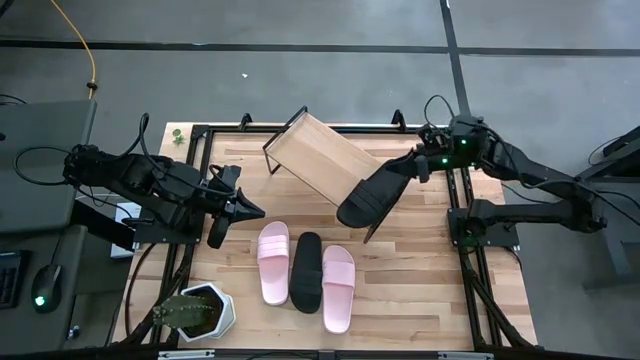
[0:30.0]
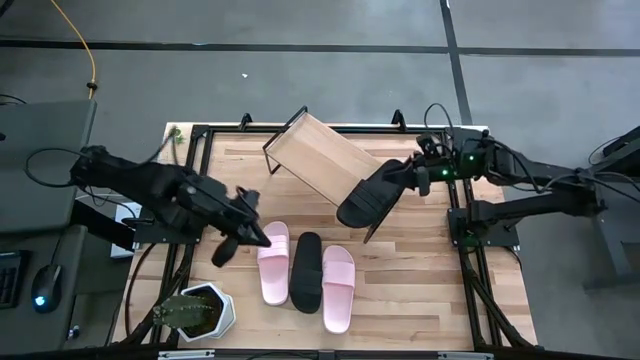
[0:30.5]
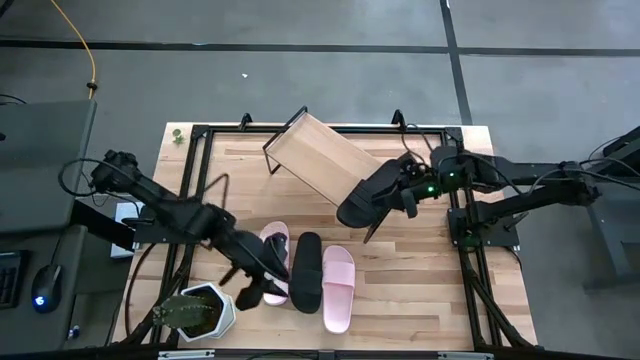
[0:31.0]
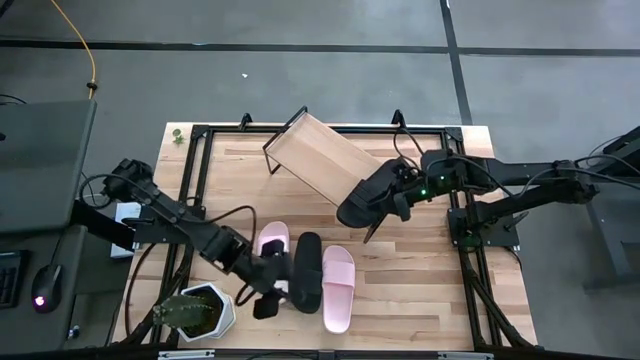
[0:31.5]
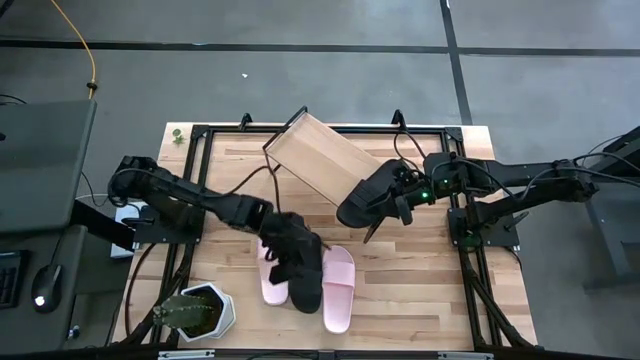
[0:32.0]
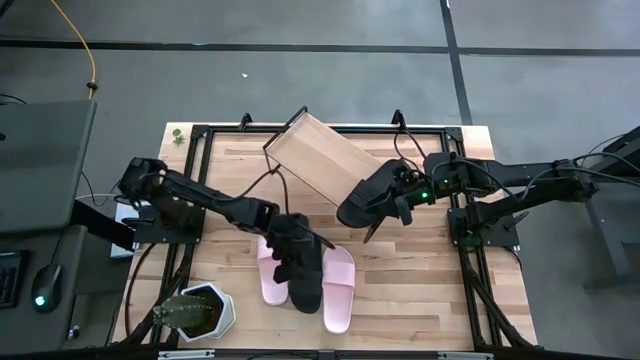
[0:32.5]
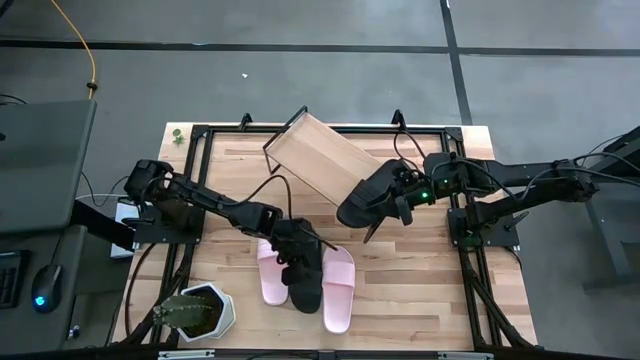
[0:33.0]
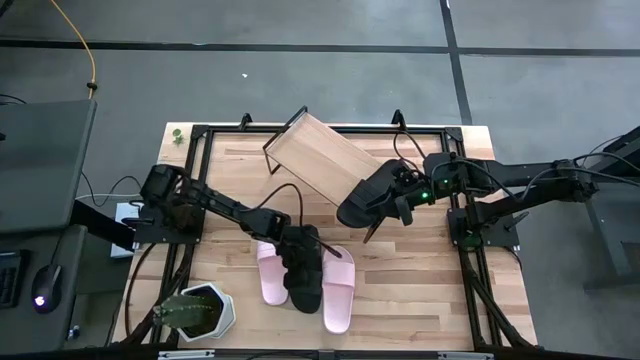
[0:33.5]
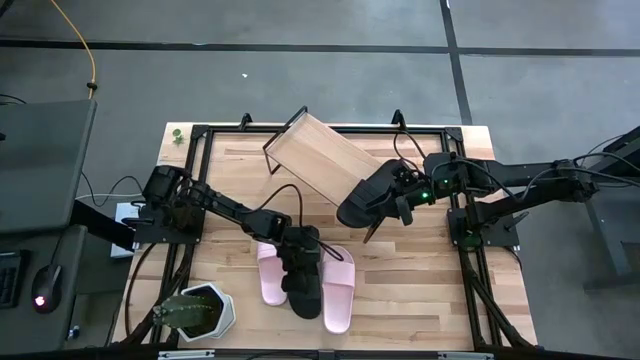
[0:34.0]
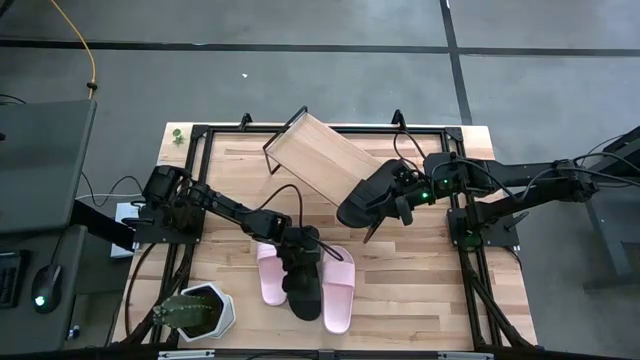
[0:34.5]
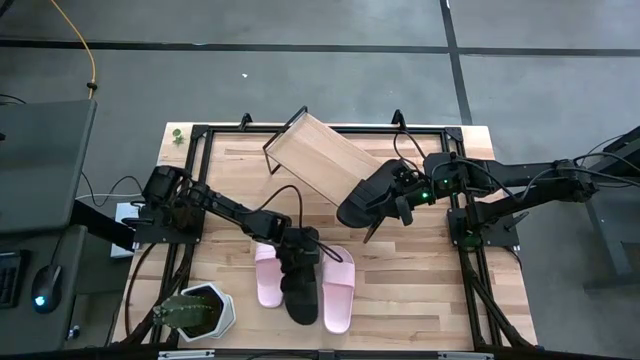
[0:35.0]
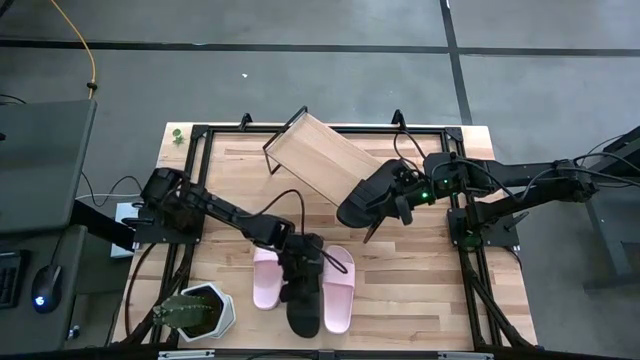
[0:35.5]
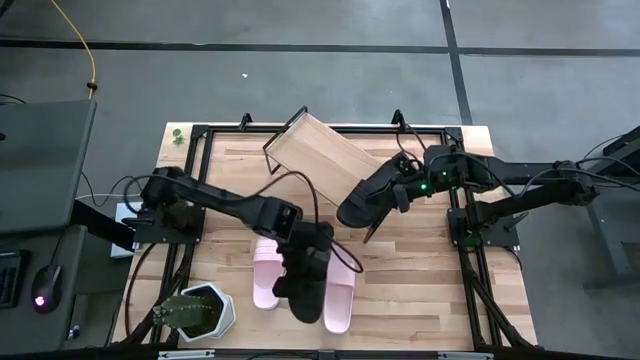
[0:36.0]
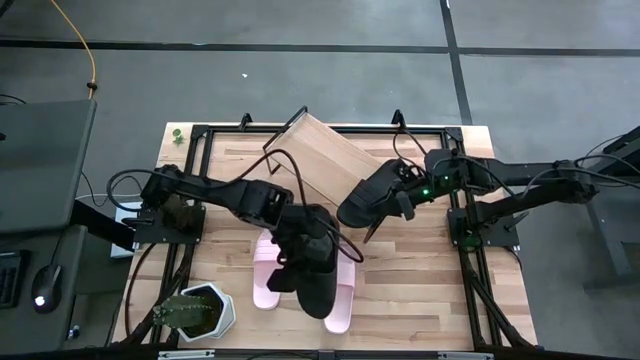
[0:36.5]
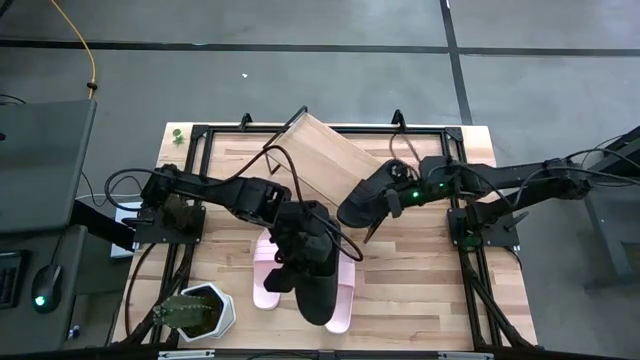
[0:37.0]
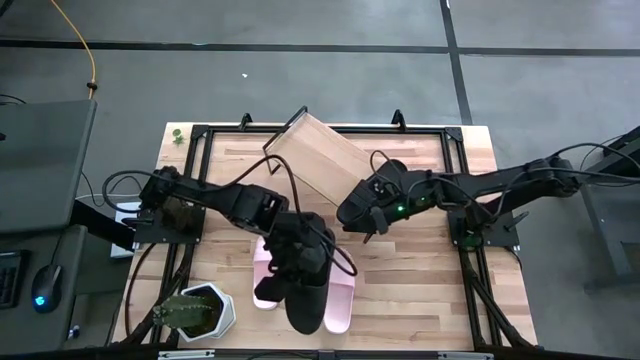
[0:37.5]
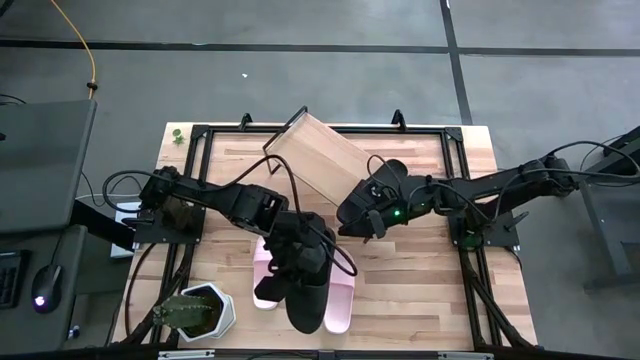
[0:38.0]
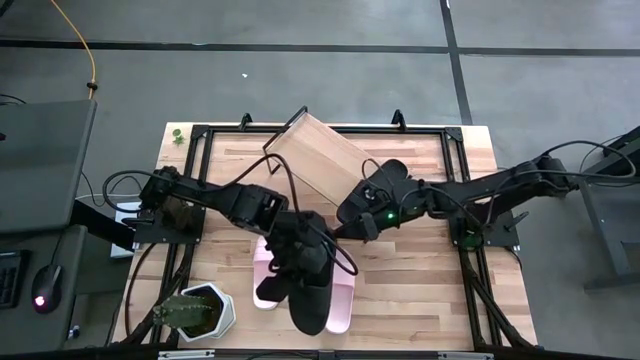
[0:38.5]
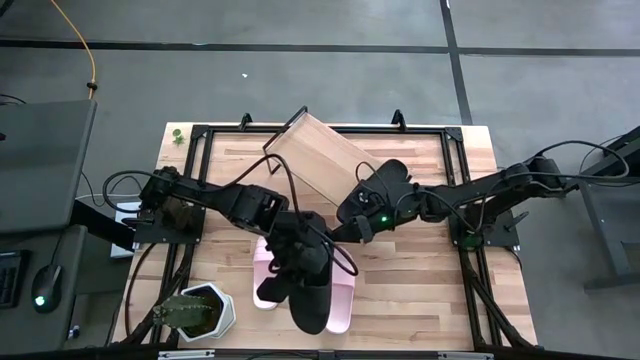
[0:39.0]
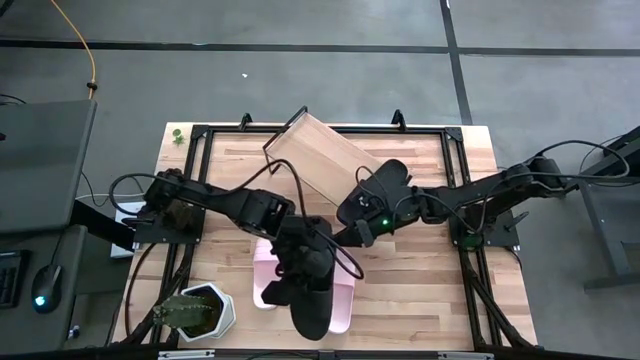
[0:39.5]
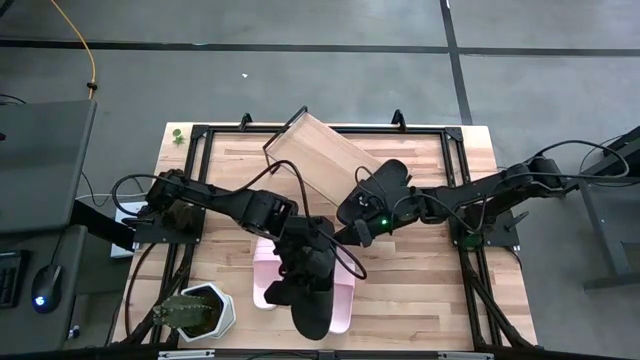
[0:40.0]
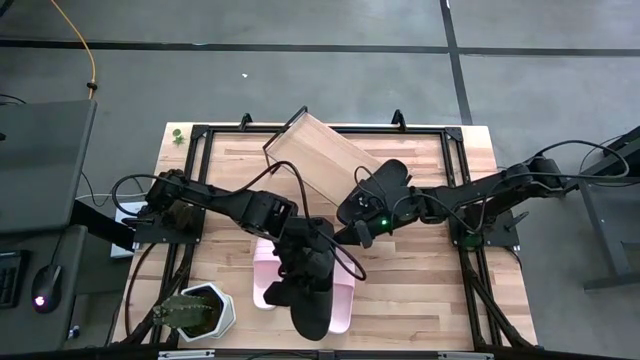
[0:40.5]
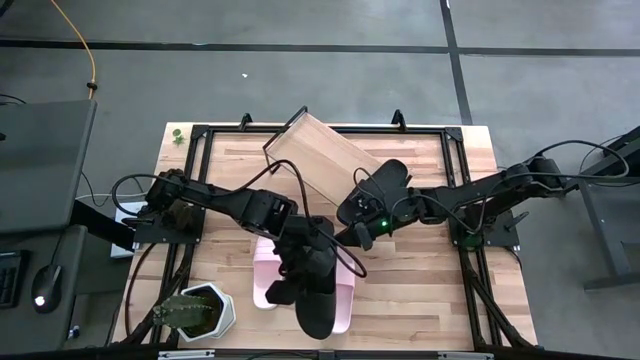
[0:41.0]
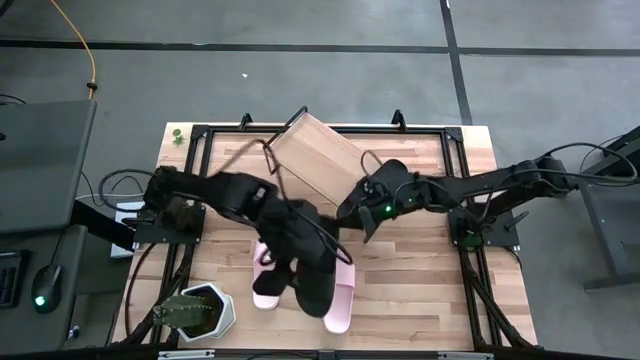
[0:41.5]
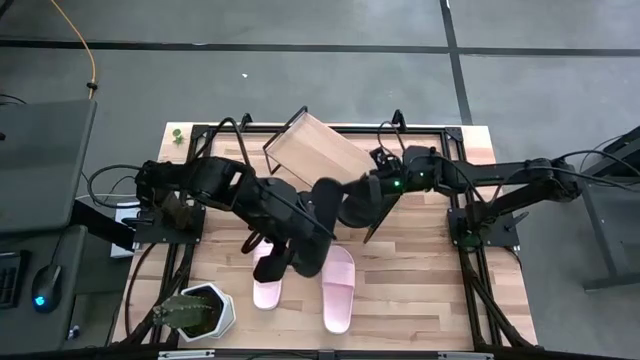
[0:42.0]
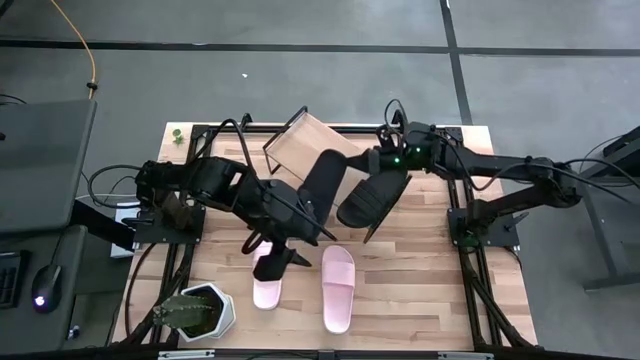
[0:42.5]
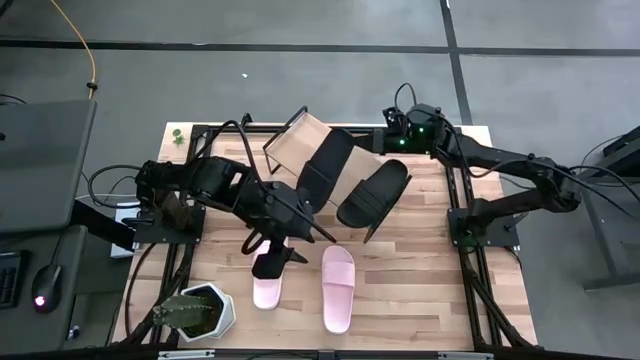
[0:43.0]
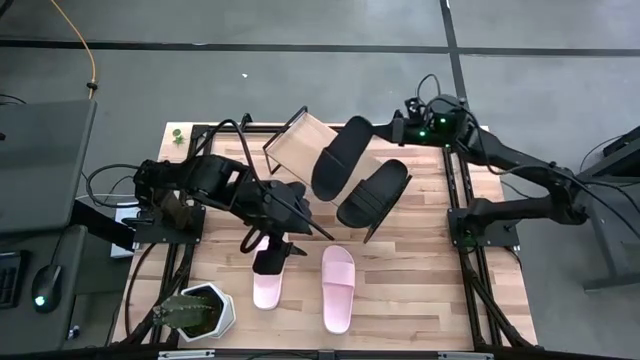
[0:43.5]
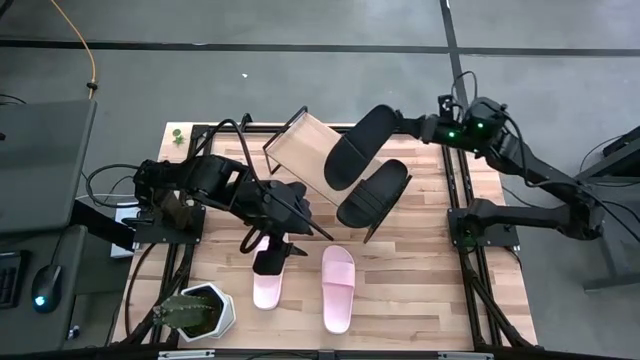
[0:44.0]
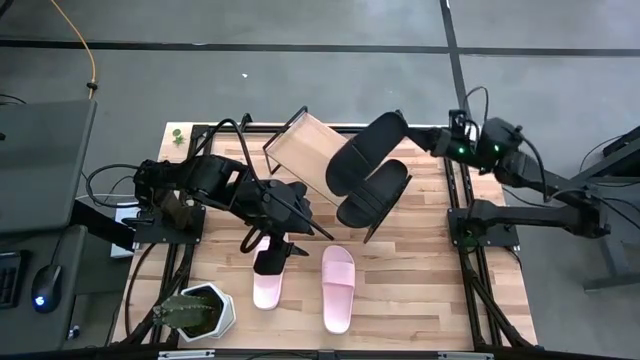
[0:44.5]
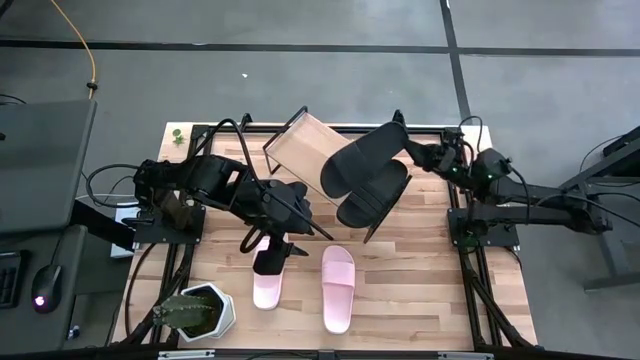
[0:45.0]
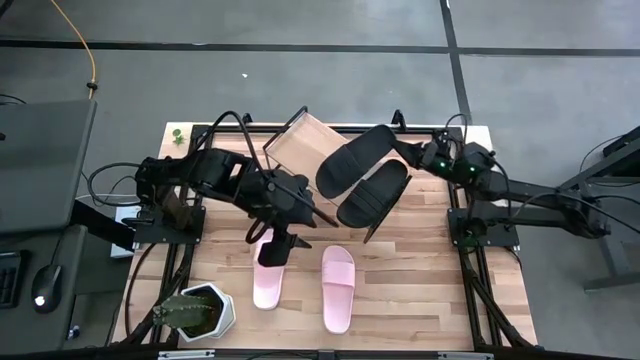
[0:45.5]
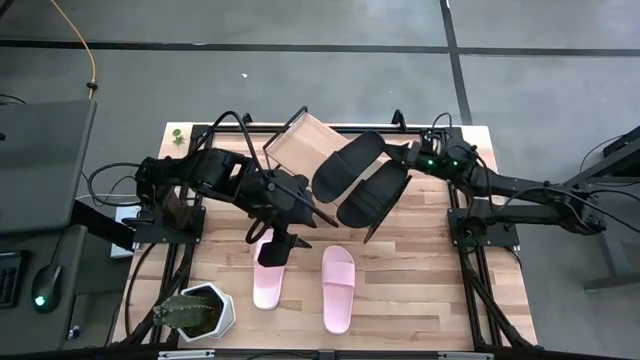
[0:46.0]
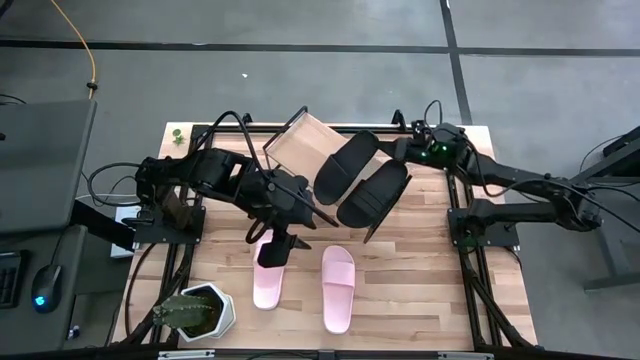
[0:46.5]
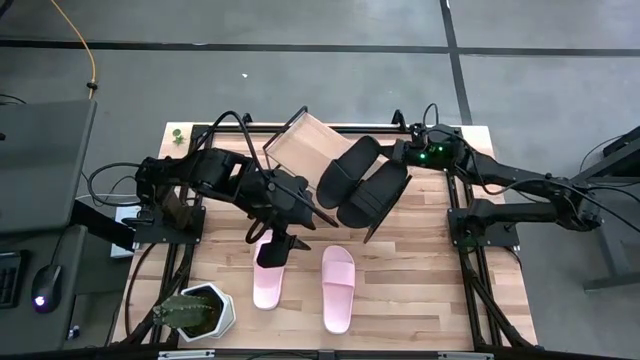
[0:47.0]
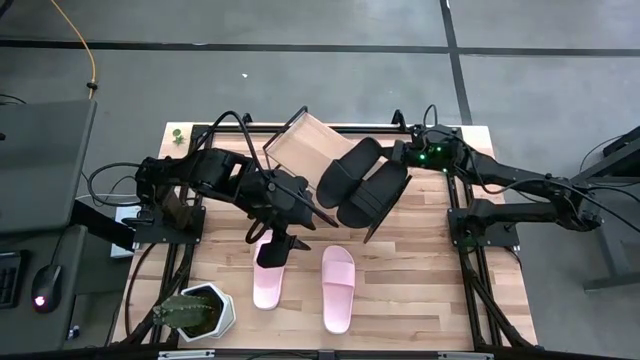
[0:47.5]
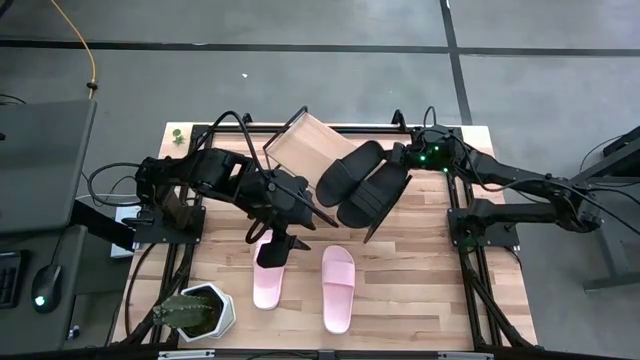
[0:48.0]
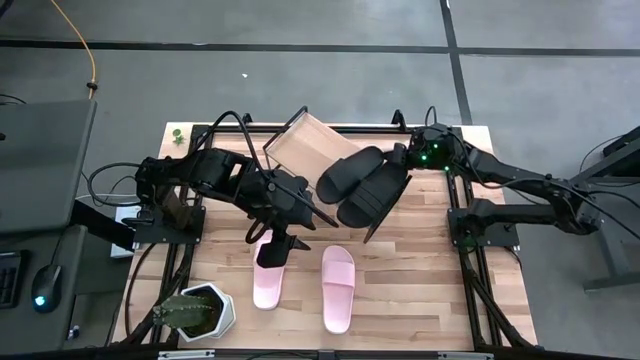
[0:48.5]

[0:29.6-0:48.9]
Task: Pick and place slides into the shelf
Put the black slide on the shelf

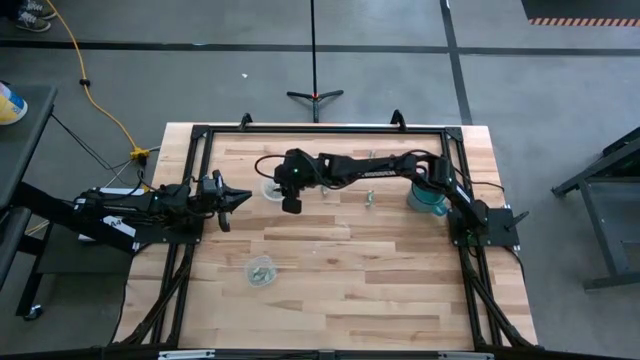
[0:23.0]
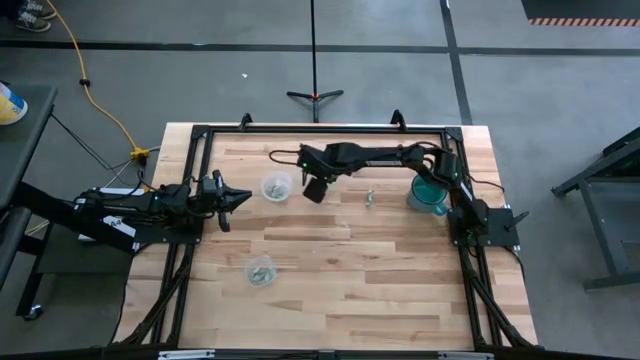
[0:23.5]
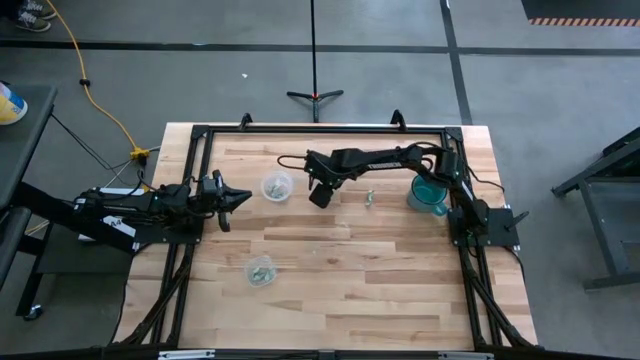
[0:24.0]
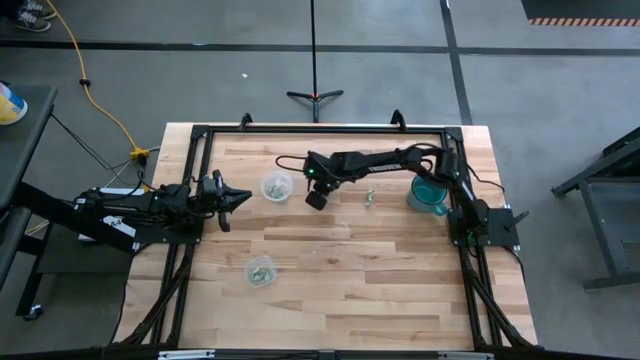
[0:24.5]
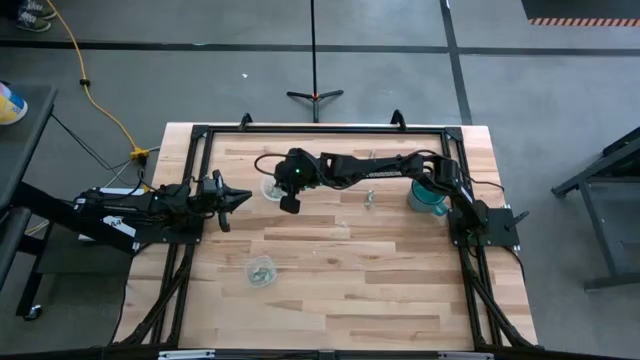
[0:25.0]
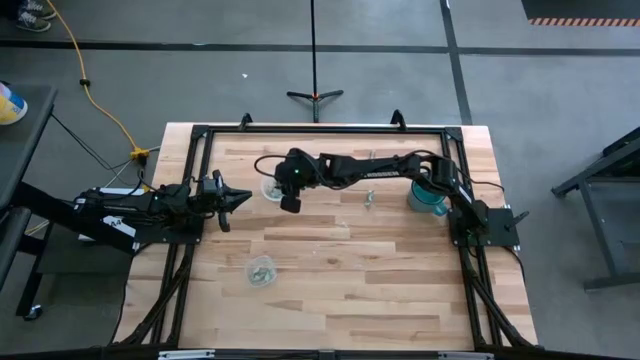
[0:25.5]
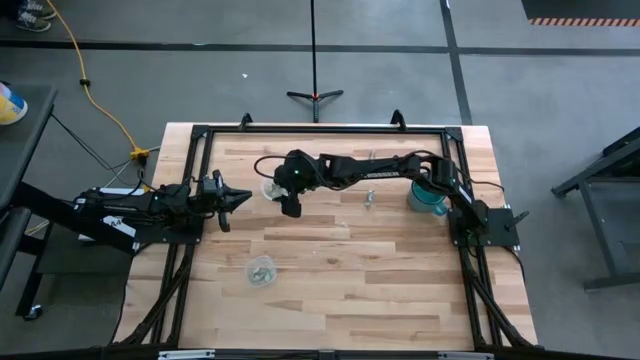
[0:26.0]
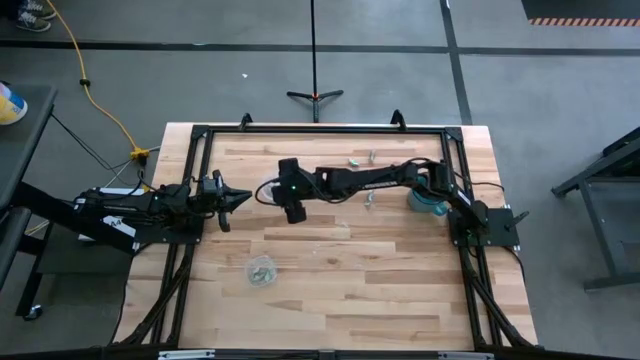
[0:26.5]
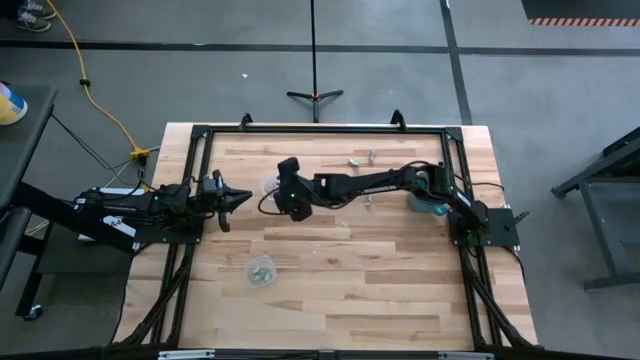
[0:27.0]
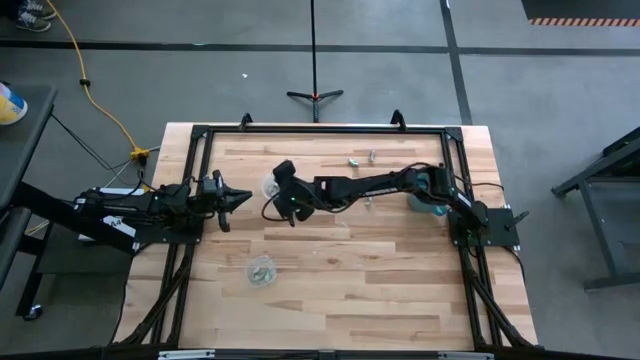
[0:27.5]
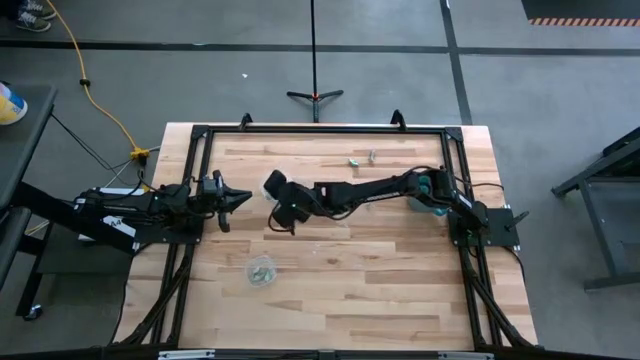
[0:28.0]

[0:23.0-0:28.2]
Task: Pick and place items into bin
Put the white stevia packet into the top transparent bin
